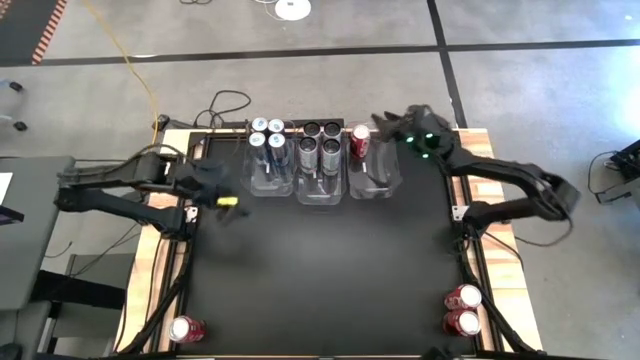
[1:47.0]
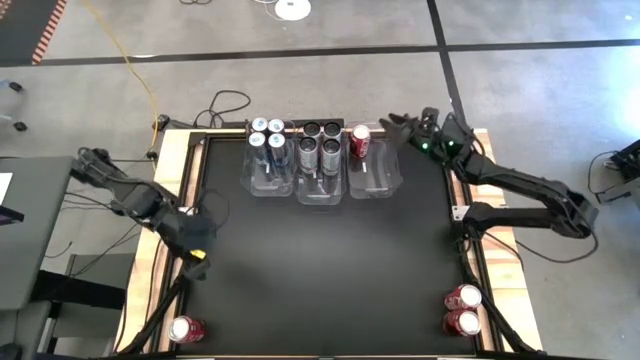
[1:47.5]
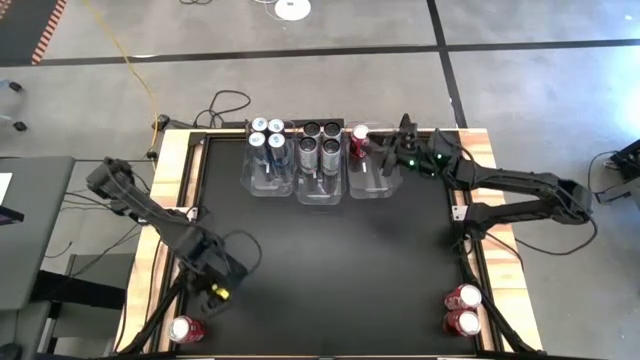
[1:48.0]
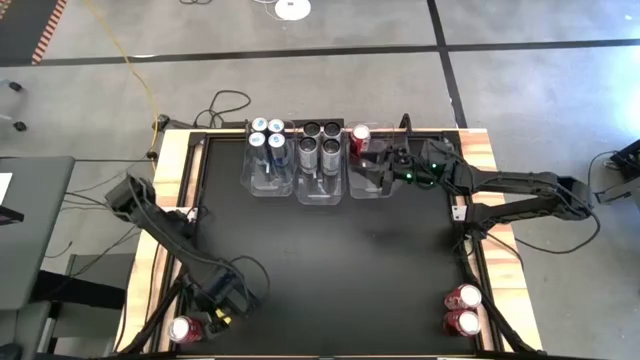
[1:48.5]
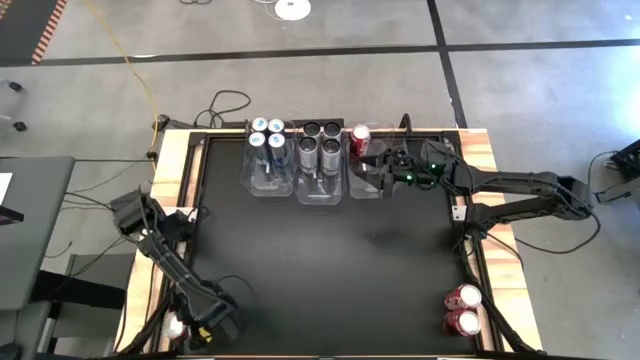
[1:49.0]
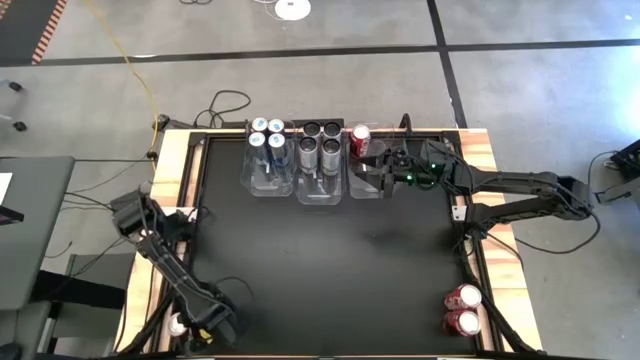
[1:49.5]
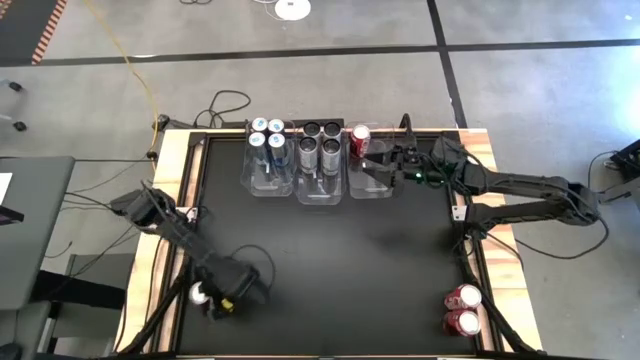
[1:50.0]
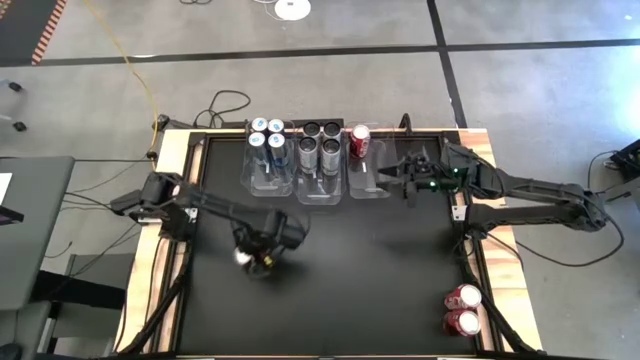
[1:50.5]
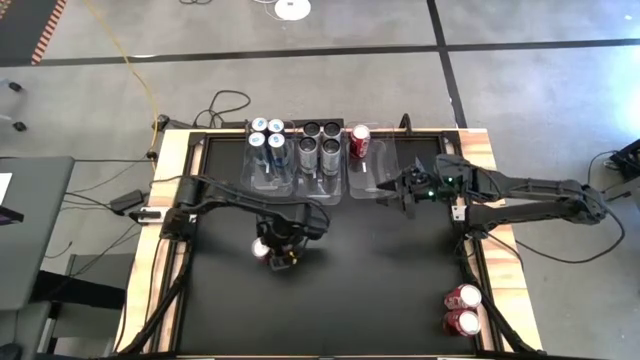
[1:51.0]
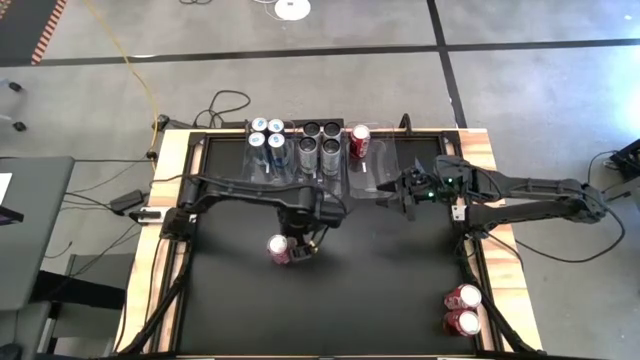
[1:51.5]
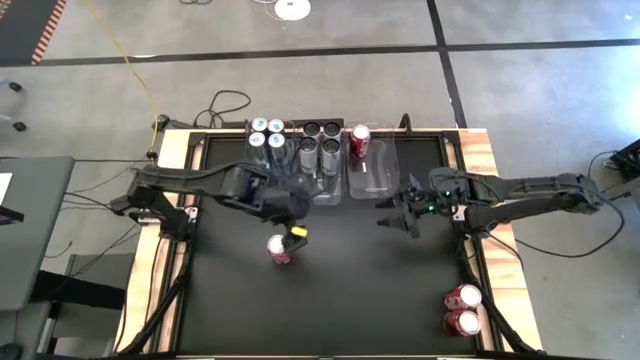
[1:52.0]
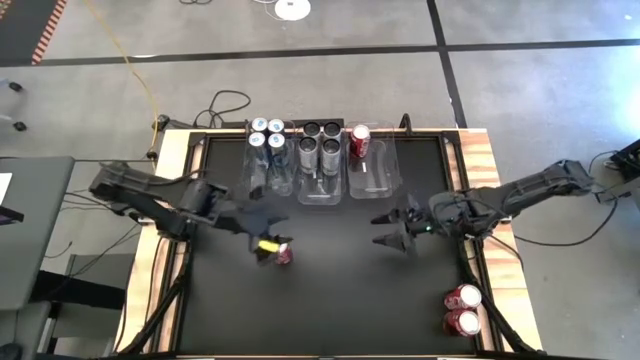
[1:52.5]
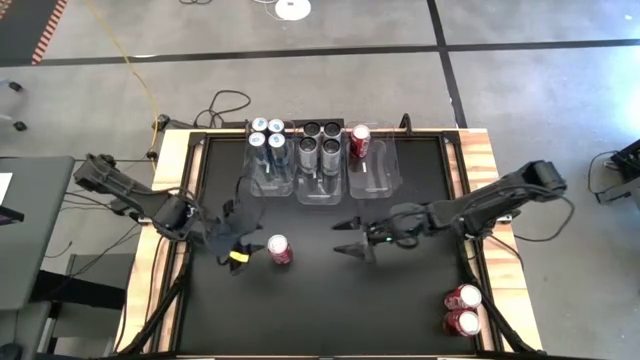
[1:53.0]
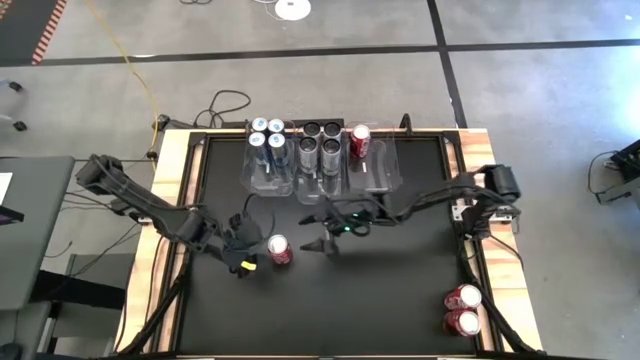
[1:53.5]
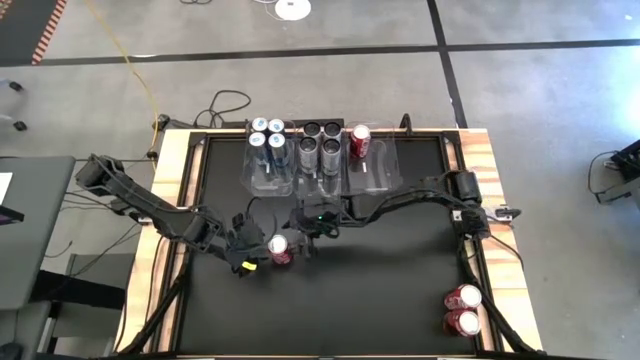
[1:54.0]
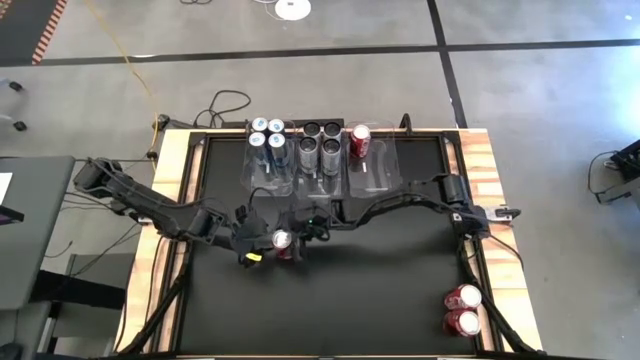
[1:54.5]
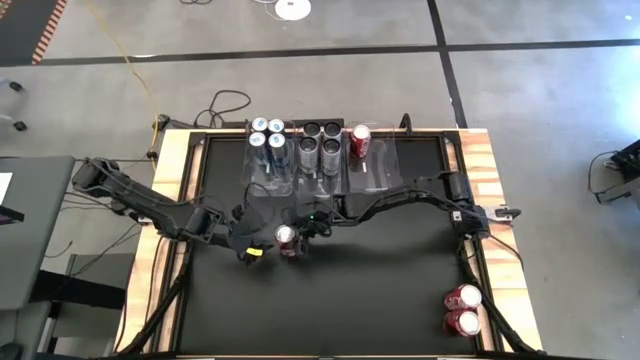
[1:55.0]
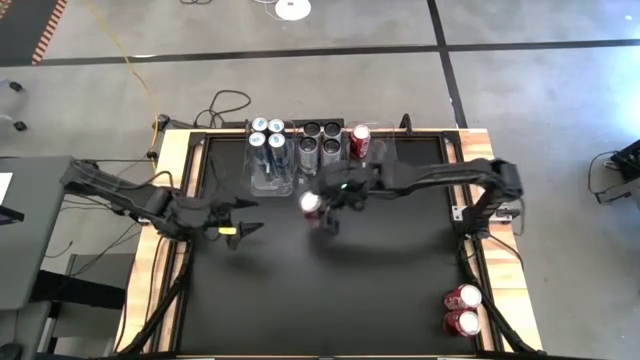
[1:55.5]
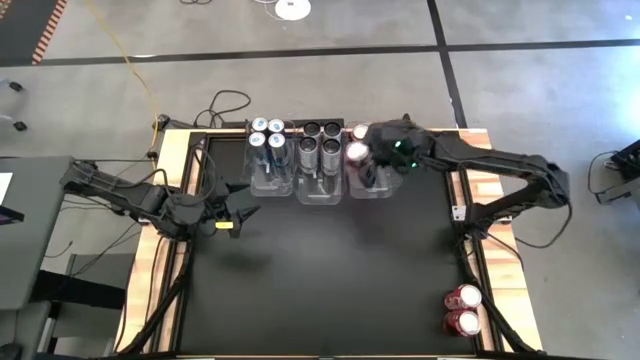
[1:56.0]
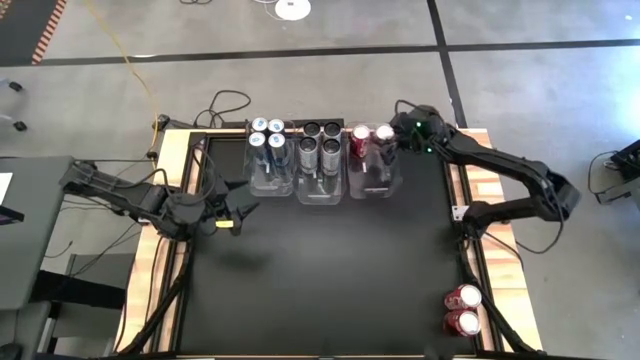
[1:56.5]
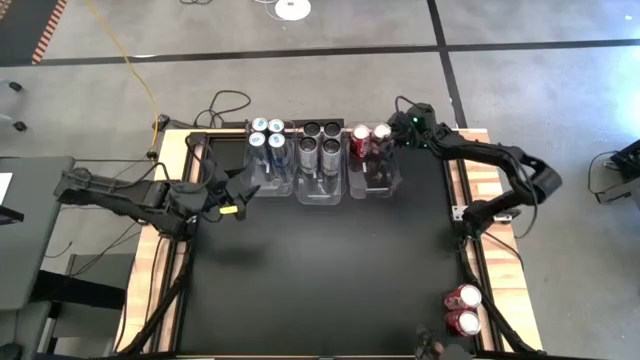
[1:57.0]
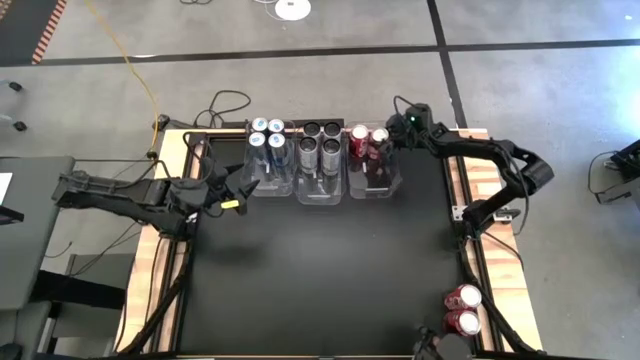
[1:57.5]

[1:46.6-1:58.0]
Task: Sort soda cans
Put the bottom left red soda can into the right transparent bin

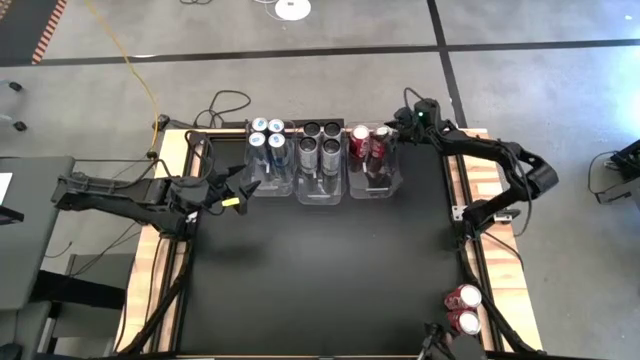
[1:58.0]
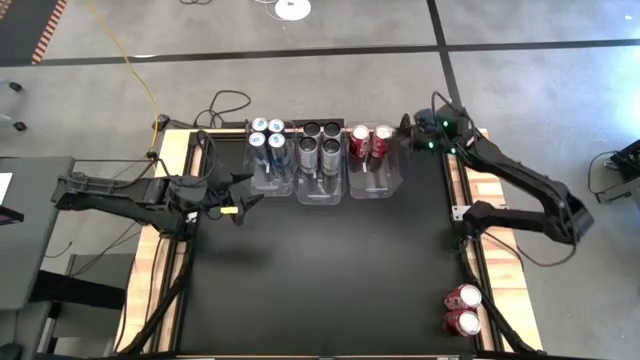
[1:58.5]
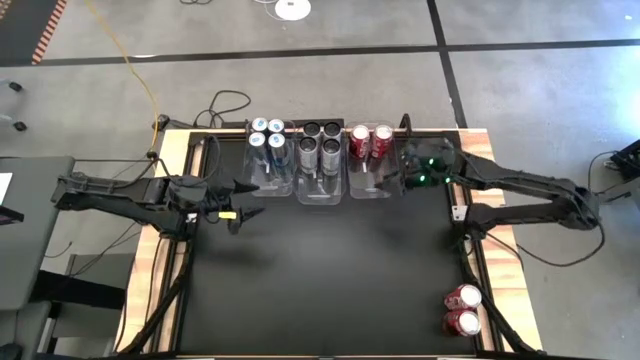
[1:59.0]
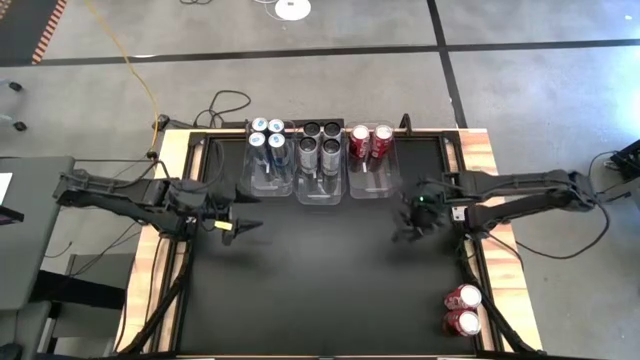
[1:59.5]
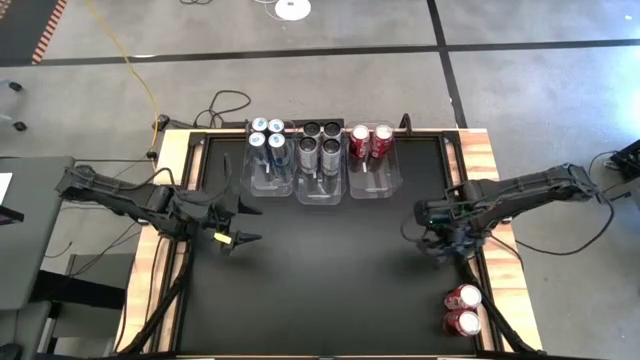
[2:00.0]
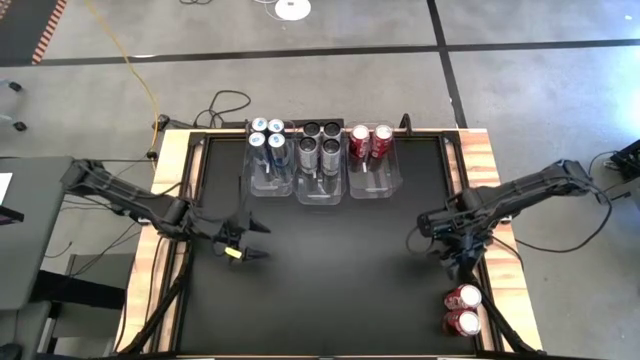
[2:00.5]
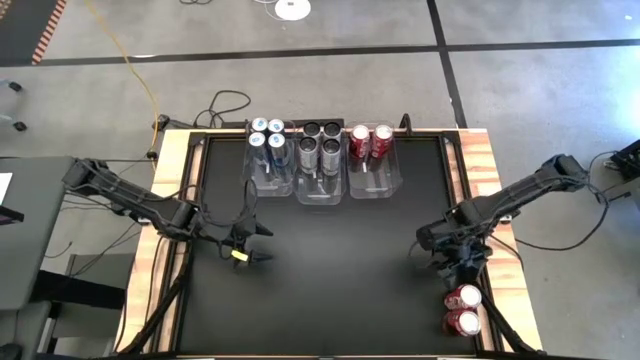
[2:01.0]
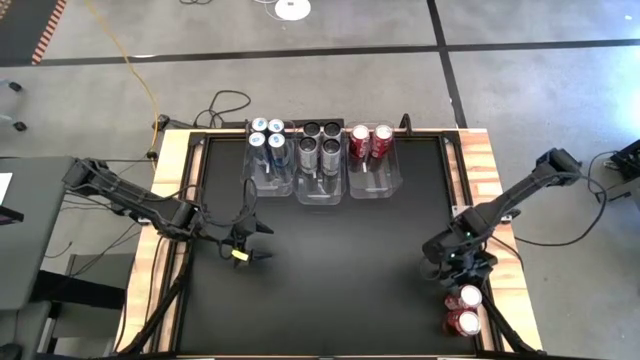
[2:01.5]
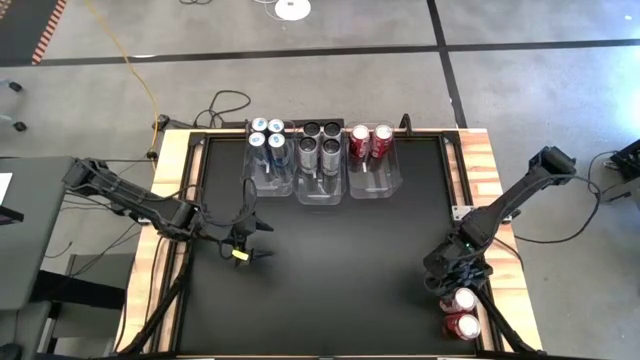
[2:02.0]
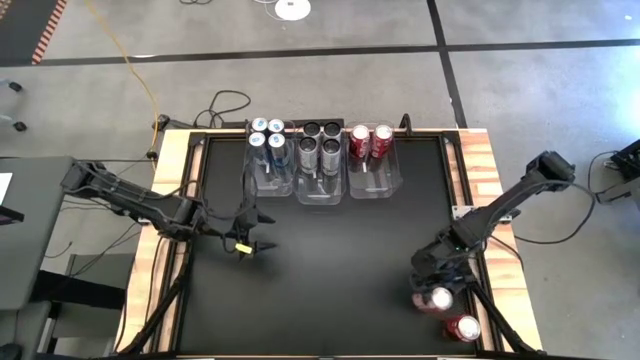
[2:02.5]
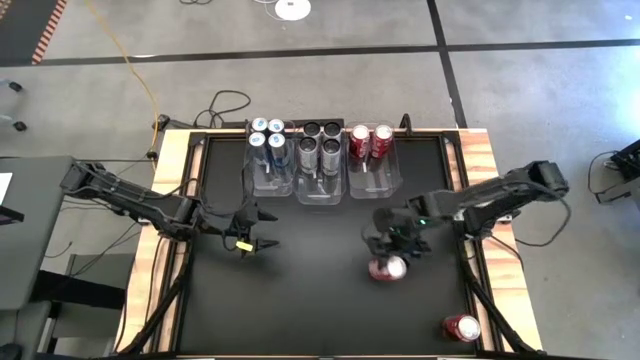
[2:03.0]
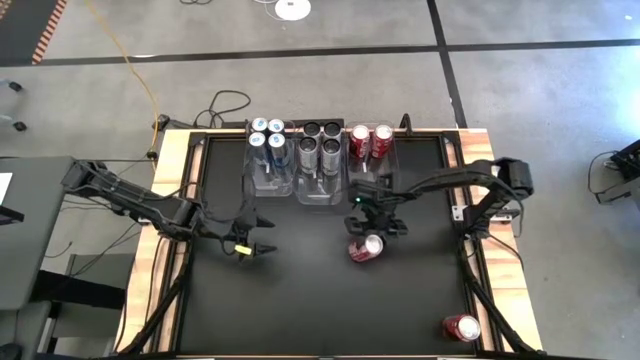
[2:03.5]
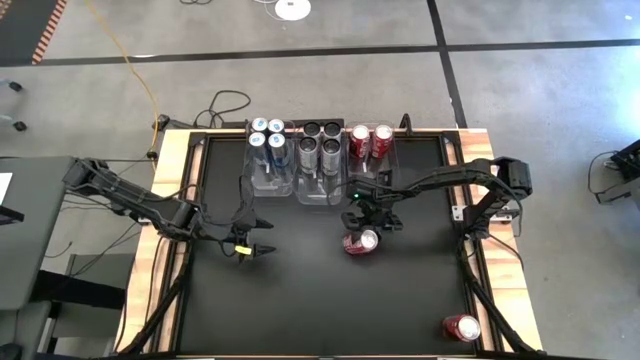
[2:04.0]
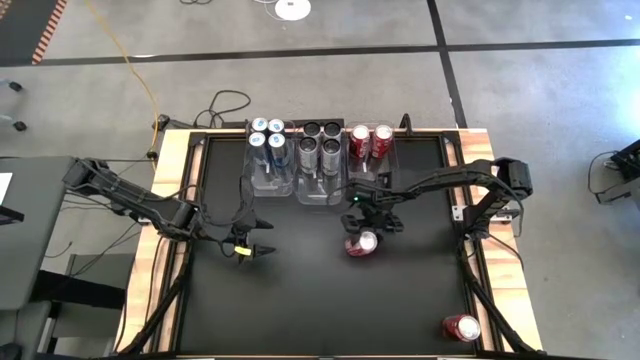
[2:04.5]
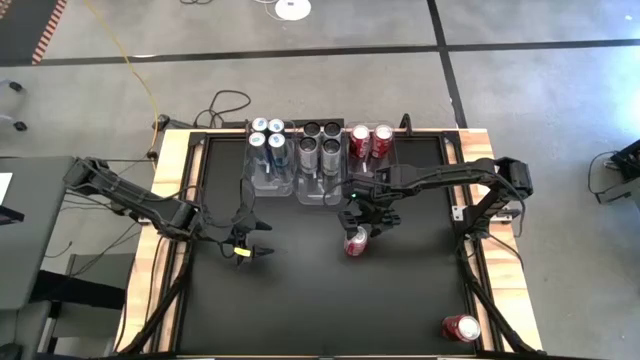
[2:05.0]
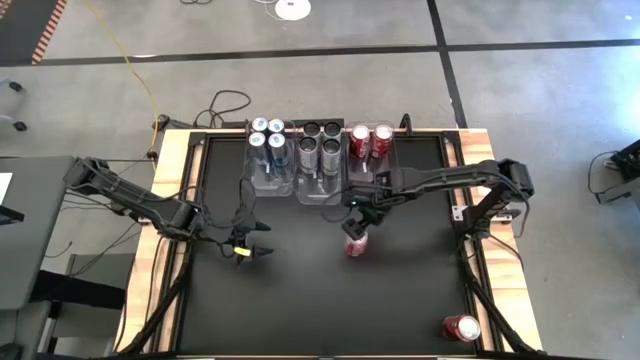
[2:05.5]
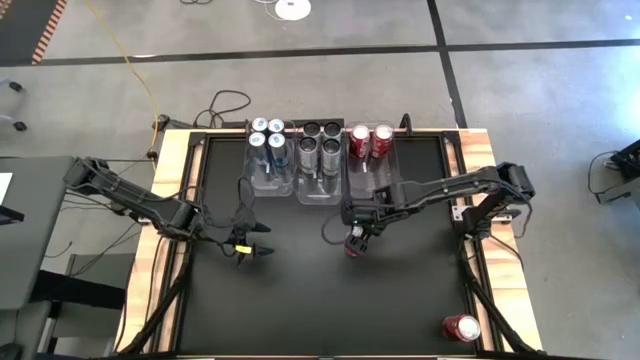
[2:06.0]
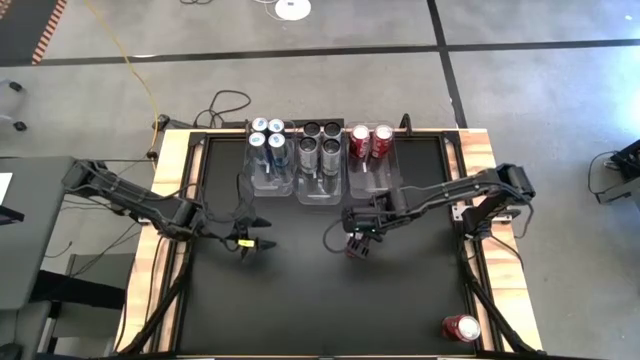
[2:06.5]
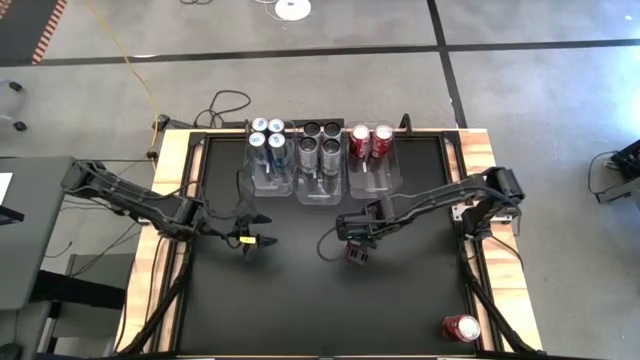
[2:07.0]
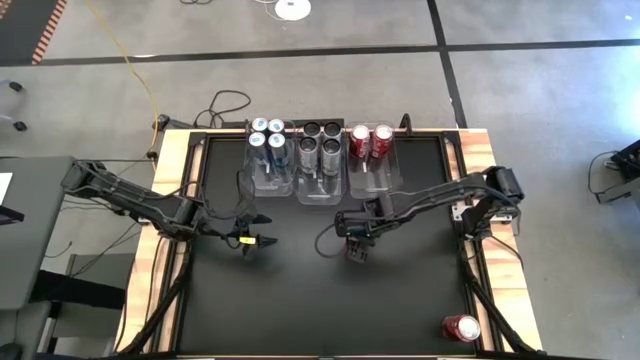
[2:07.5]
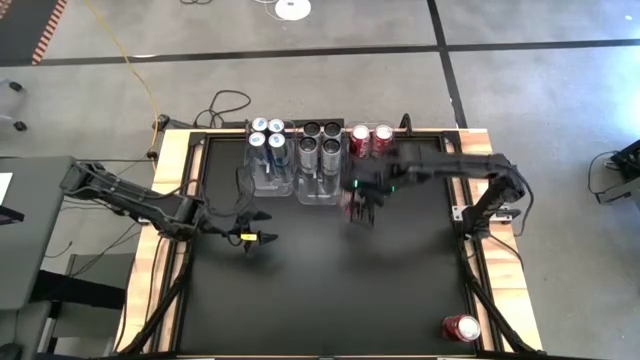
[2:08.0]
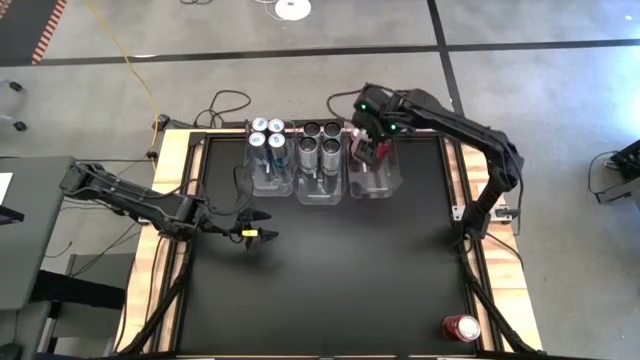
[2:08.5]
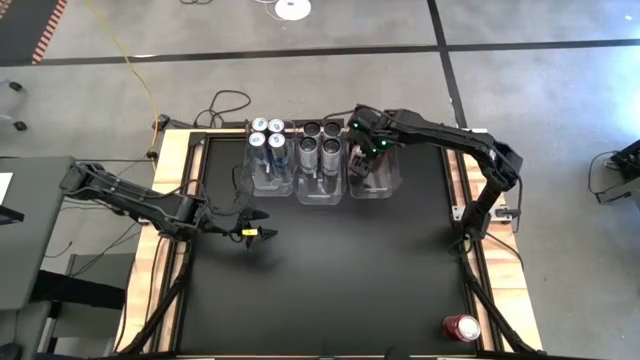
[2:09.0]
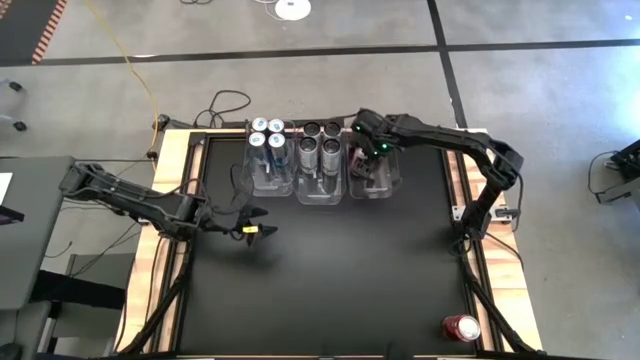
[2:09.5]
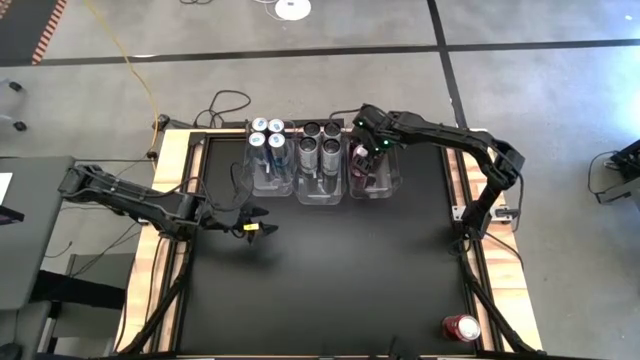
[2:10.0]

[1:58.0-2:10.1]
Put the top red soda can into the right transparent bin
